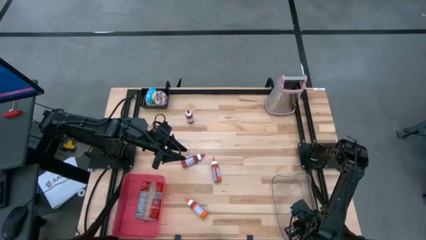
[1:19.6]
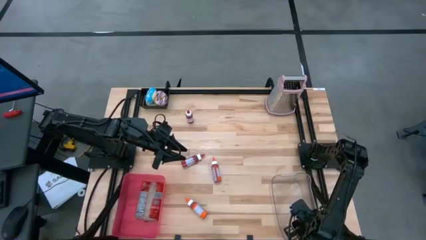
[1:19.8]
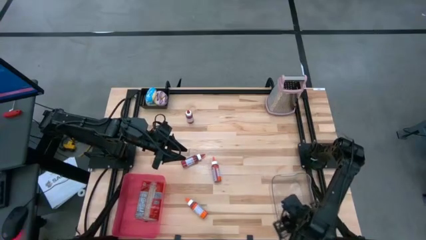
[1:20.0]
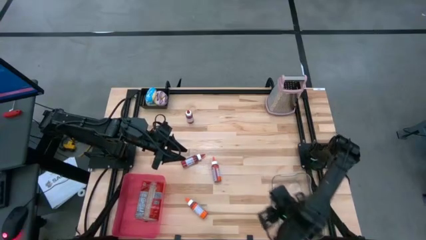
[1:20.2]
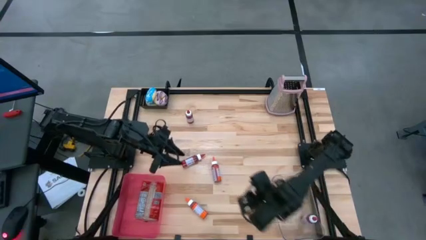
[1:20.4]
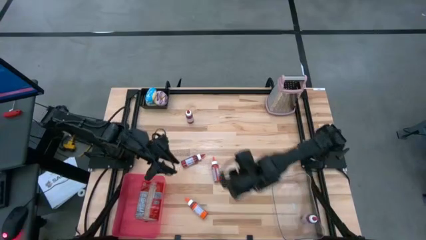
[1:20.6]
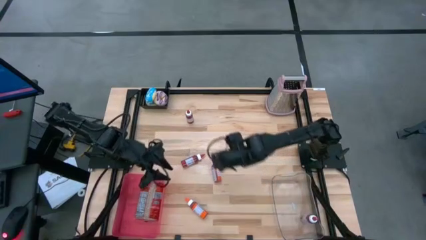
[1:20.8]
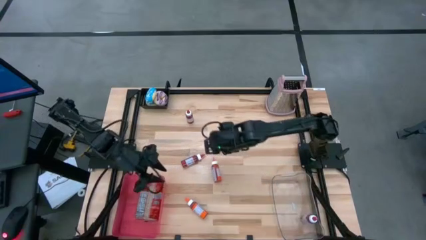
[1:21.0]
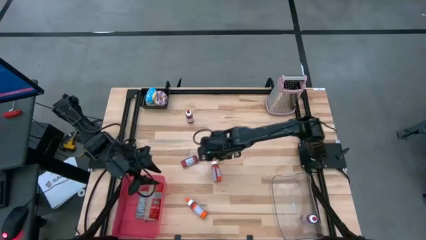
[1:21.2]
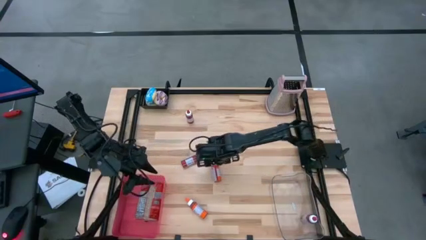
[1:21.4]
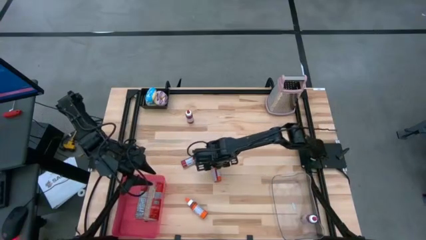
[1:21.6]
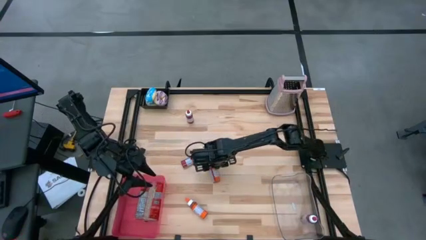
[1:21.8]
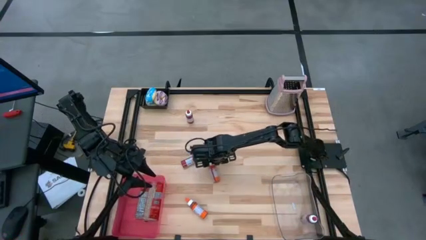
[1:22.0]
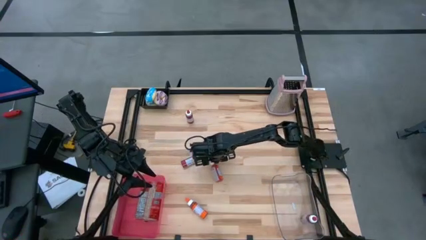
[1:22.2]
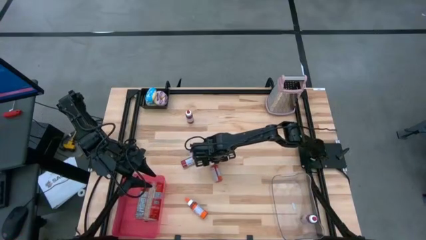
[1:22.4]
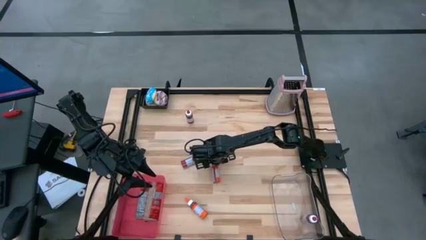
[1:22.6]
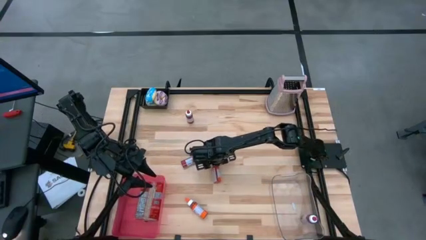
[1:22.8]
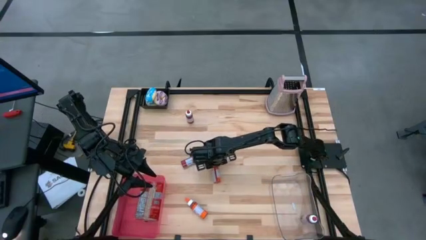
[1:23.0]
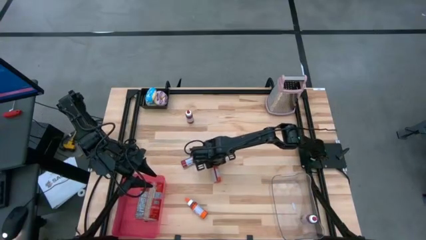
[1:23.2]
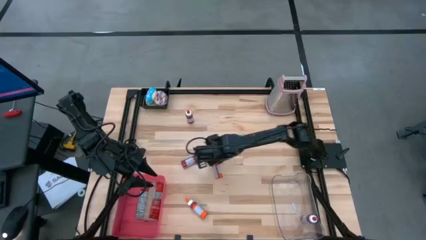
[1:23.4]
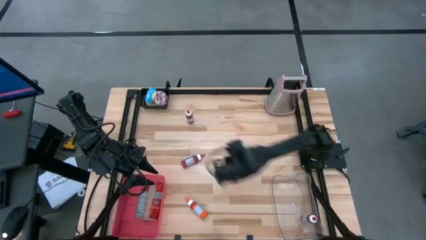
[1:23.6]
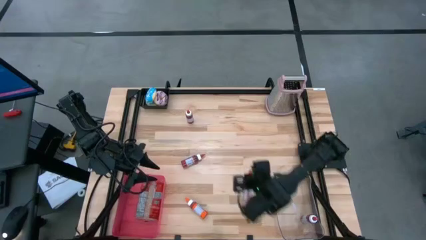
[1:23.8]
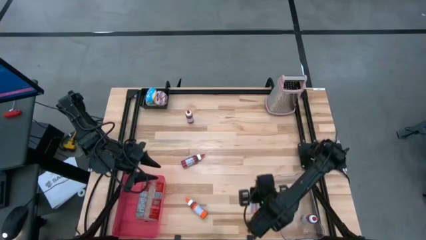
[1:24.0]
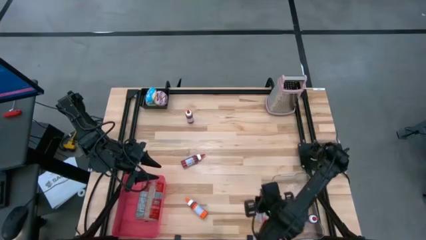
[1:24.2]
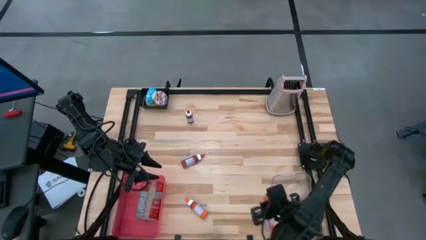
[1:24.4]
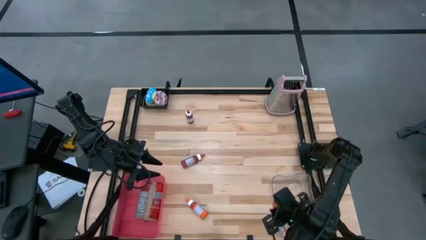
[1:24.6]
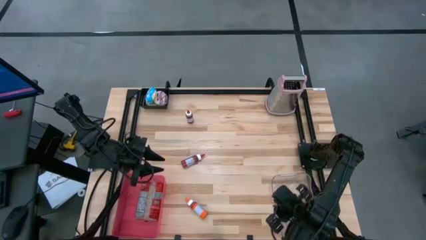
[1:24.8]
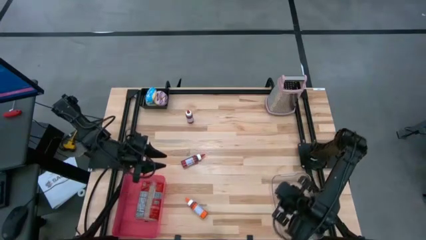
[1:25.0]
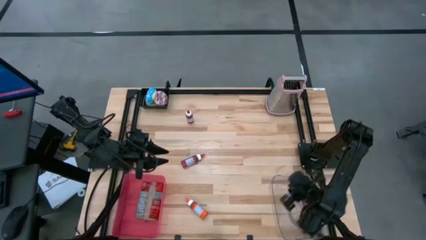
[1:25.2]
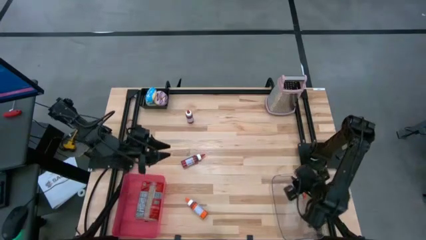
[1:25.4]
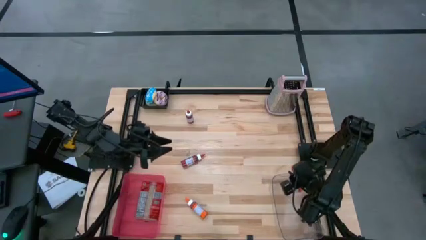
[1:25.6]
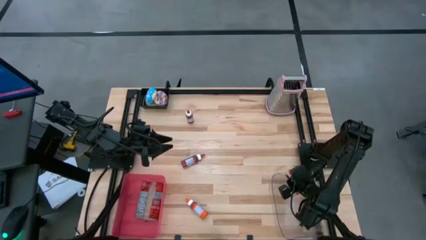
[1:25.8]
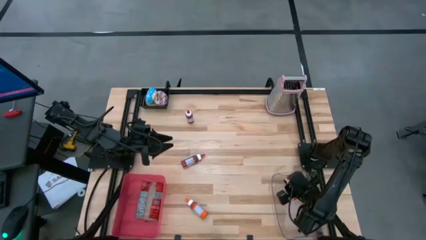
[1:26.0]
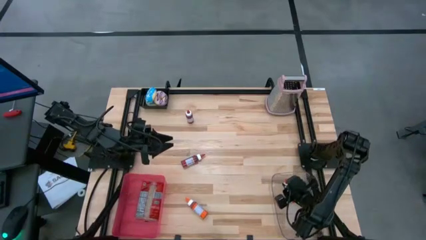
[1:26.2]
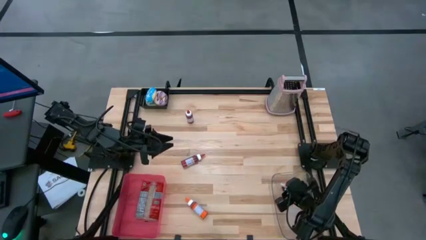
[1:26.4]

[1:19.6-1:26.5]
Put the top orange food coloring bottle into the transparent bin

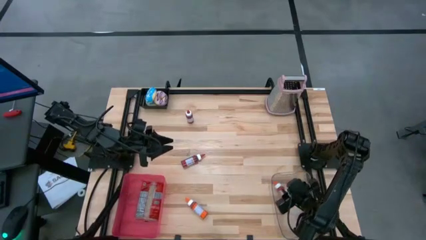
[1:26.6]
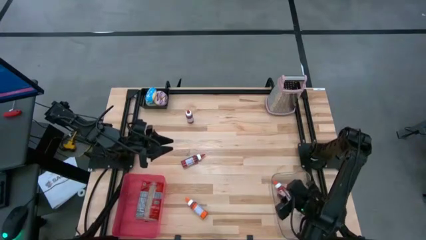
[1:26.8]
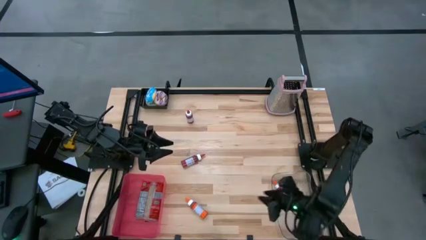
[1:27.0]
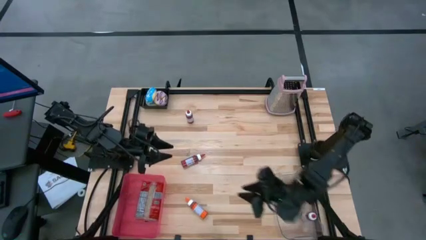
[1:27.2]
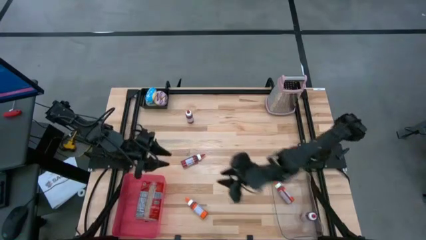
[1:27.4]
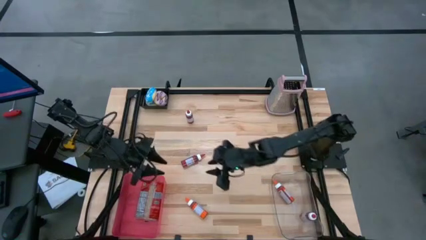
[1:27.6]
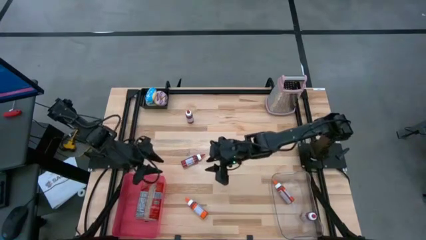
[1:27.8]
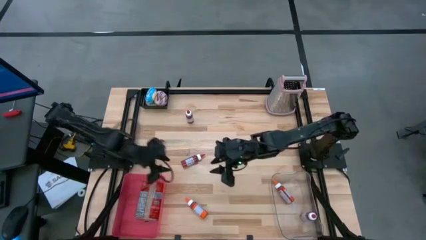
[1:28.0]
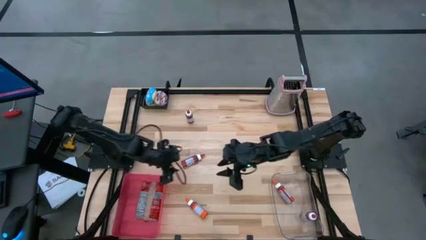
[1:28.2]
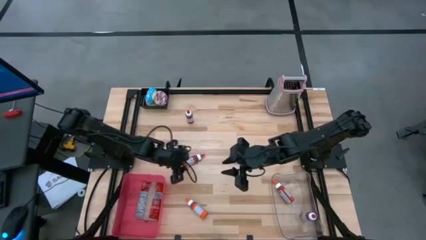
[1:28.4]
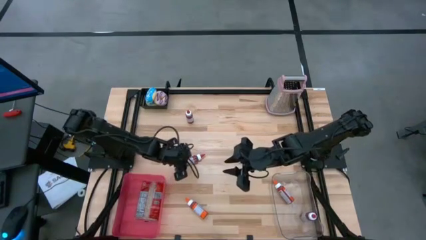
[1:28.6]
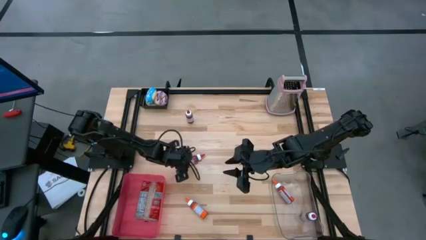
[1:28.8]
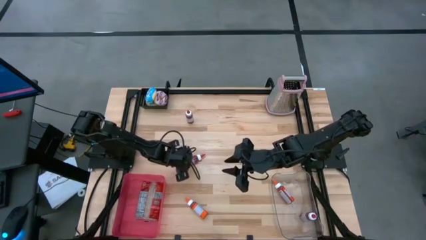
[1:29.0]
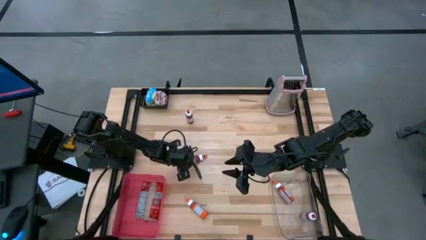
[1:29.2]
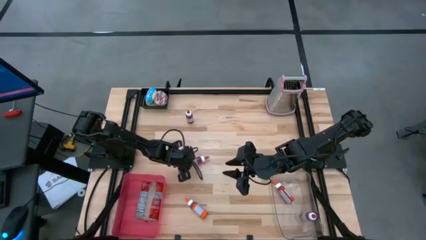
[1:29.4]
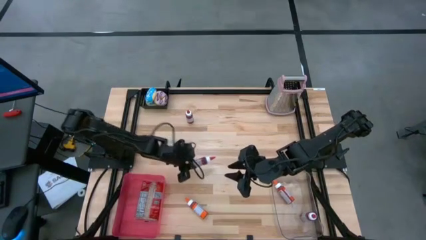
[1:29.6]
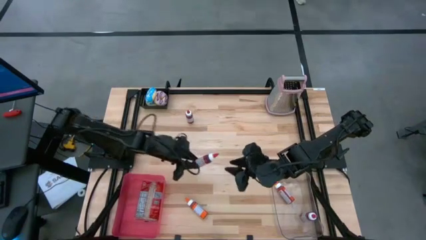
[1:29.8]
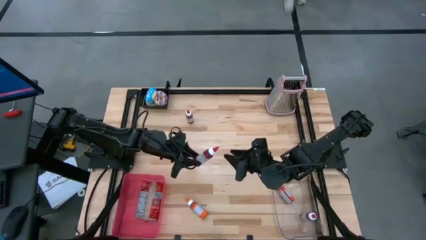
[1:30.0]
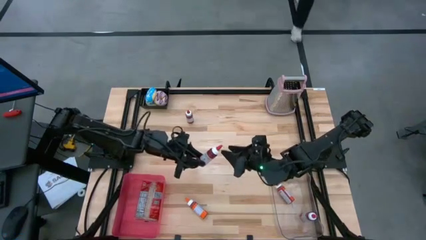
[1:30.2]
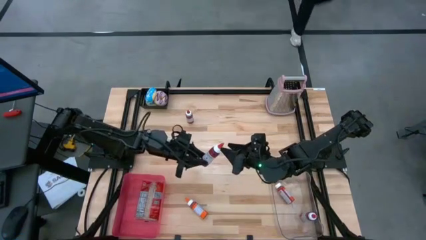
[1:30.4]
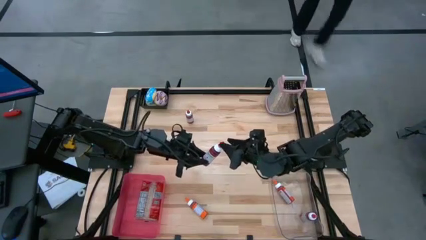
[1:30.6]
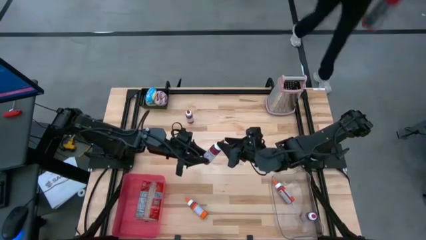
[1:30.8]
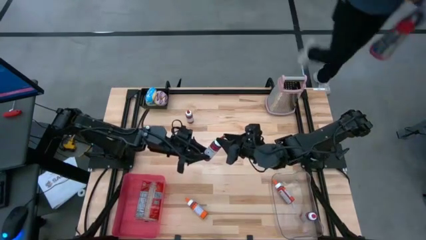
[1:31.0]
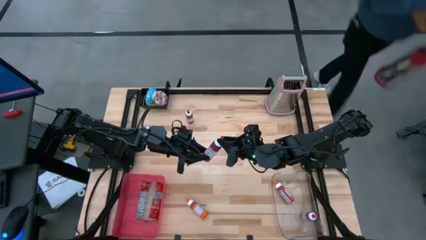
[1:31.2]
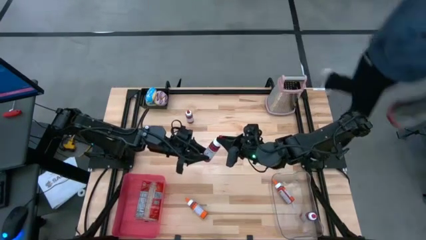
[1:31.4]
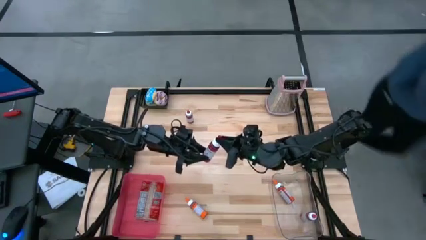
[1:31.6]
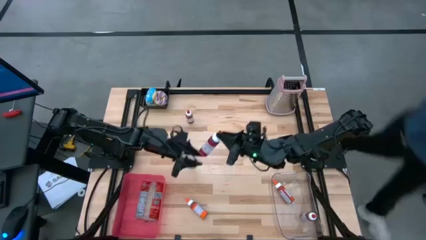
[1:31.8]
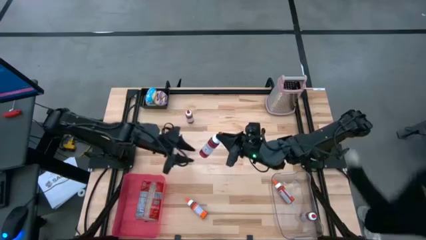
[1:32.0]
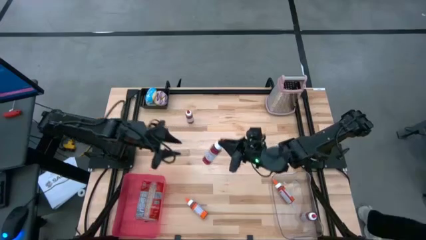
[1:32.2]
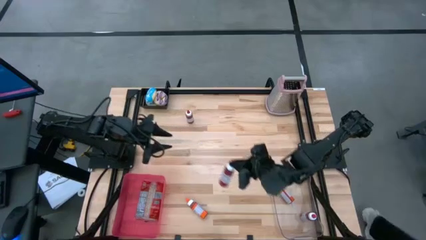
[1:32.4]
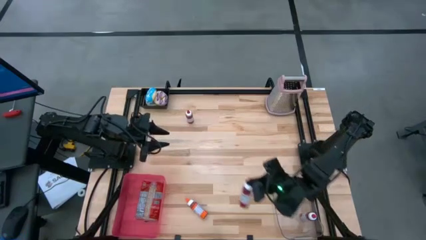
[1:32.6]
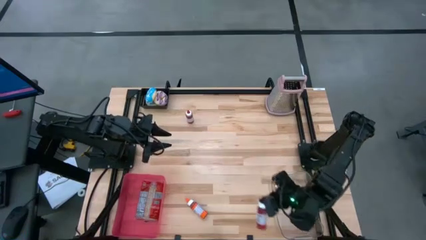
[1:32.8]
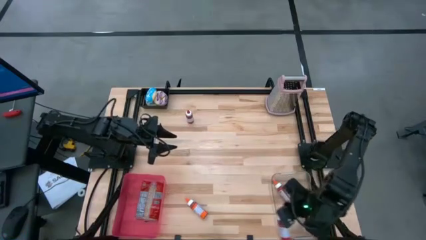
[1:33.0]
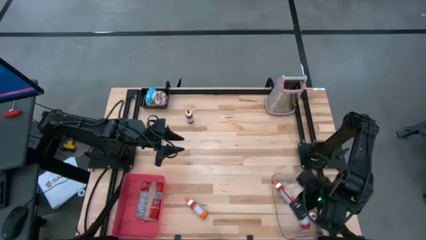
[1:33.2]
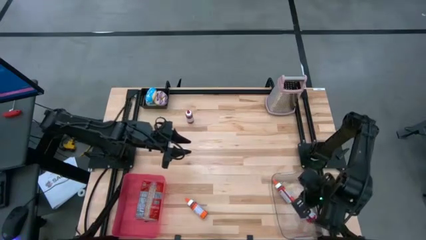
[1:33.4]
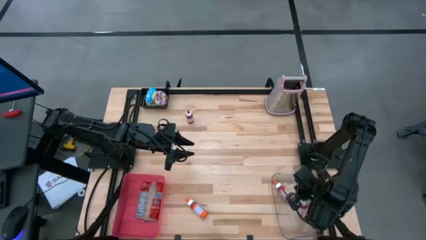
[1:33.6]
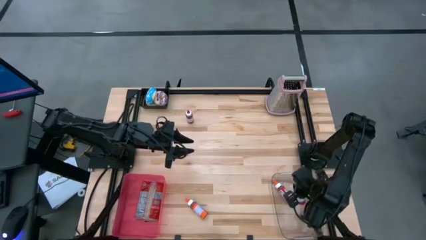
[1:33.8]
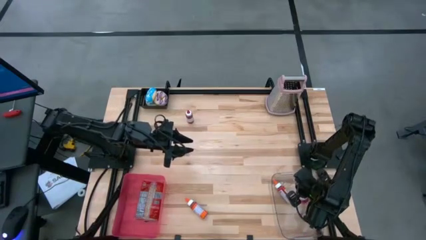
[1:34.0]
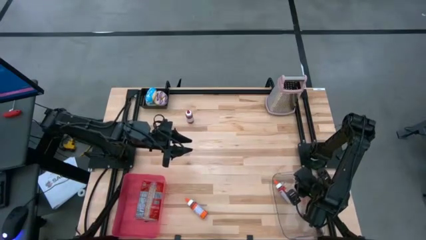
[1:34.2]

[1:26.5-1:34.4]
Put the bottom red food coloring bottle into the transparent bin

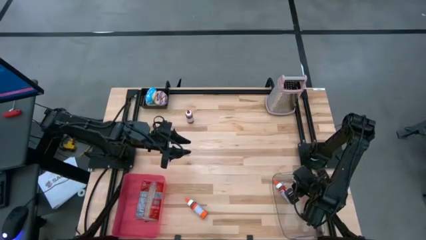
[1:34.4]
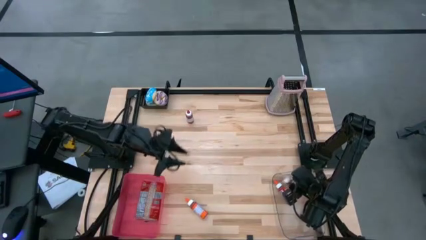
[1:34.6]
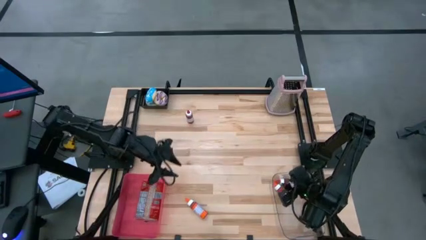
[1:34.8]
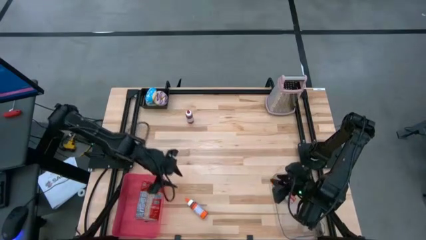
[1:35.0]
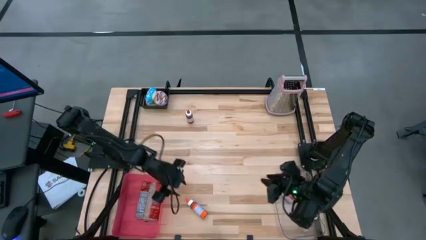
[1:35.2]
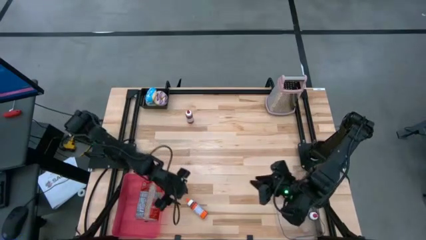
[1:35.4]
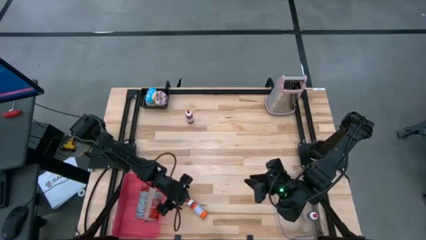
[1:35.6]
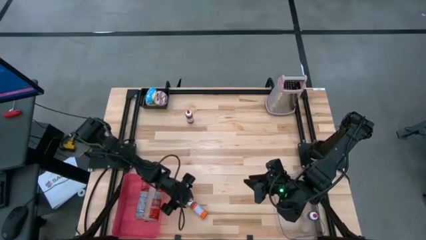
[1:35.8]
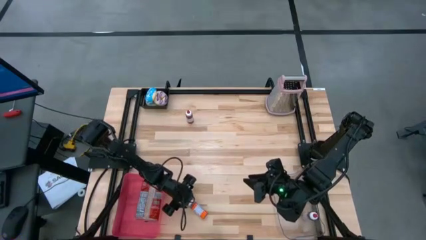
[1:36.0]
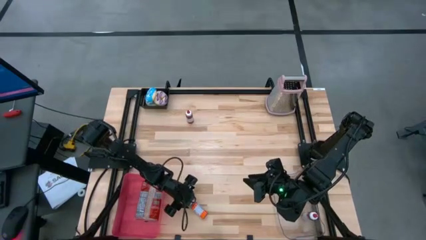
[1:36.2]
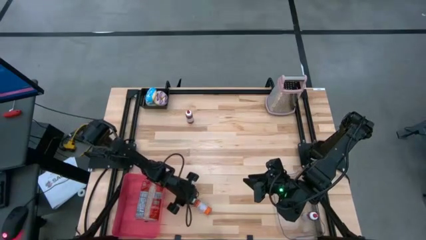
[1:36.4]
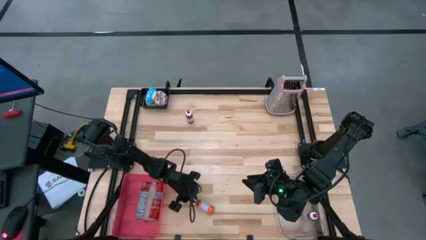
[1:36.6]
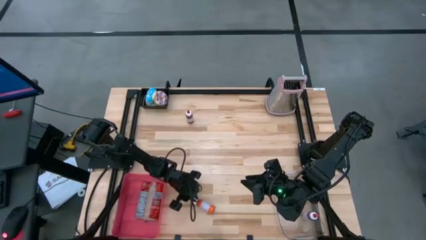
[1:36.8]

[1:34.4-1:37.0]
Put the orange food coloring bottle into the transparent bin
